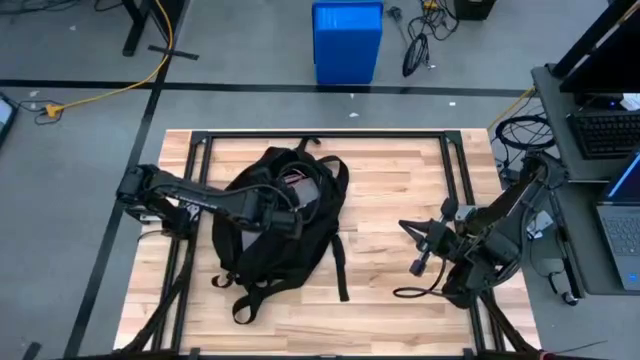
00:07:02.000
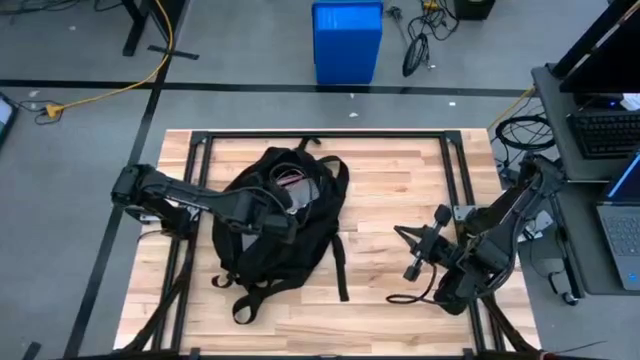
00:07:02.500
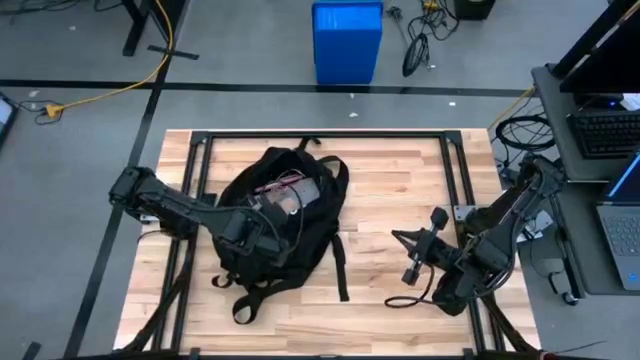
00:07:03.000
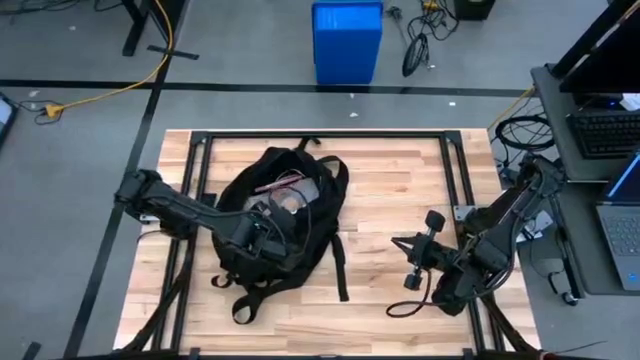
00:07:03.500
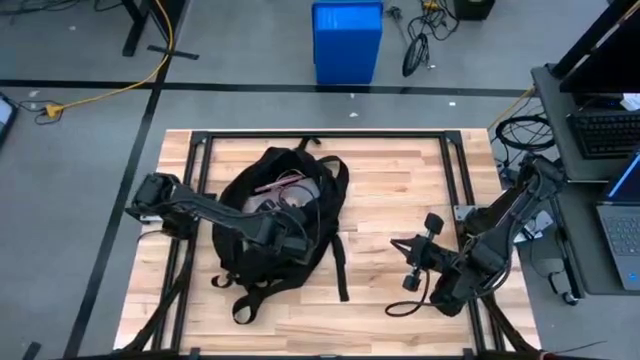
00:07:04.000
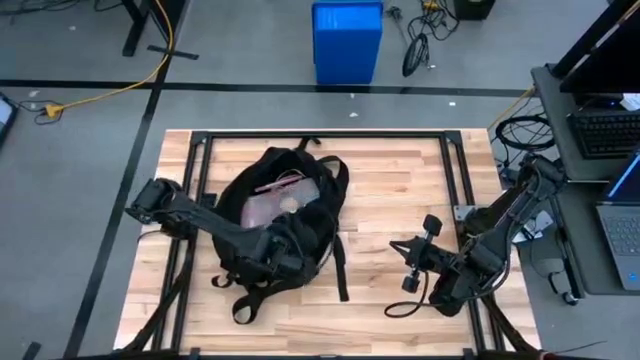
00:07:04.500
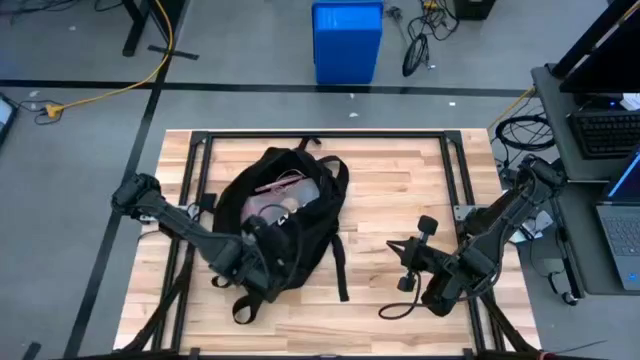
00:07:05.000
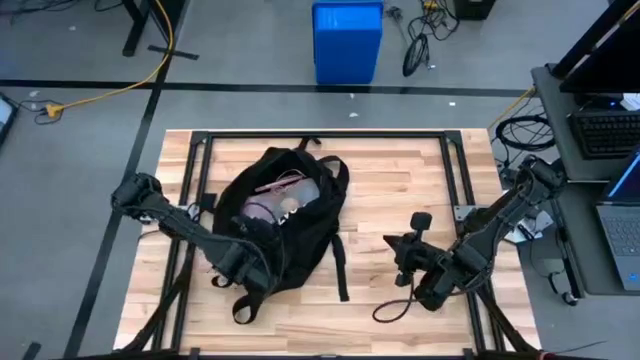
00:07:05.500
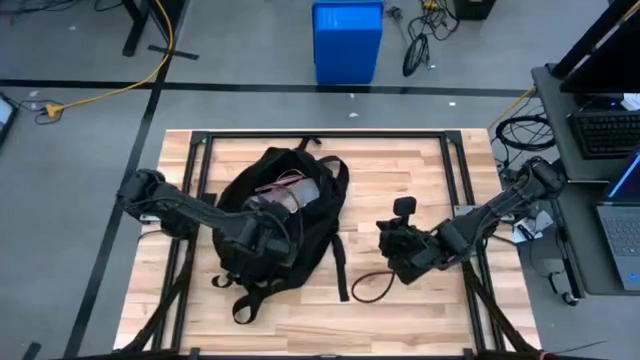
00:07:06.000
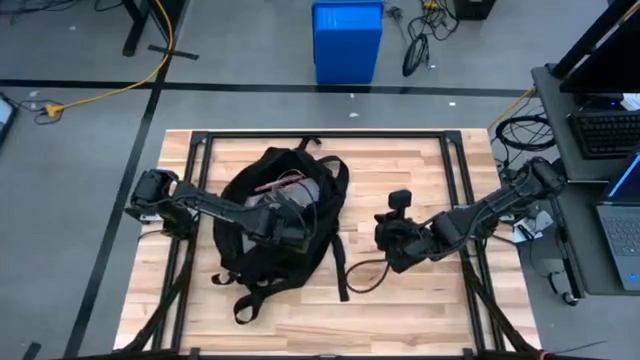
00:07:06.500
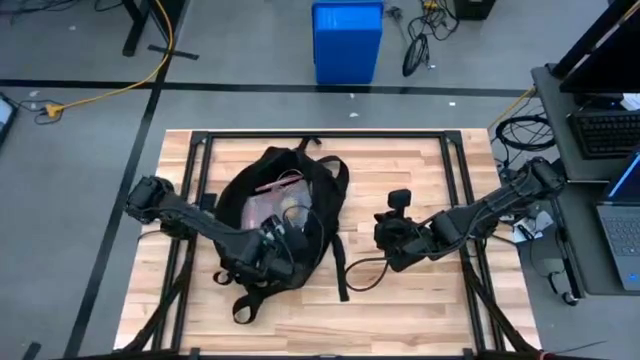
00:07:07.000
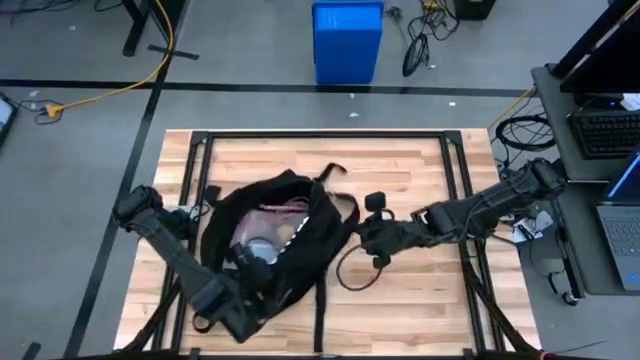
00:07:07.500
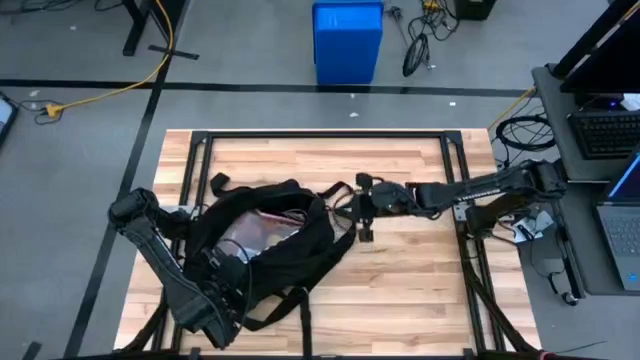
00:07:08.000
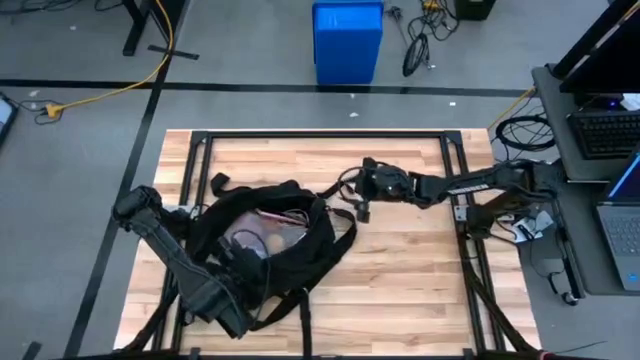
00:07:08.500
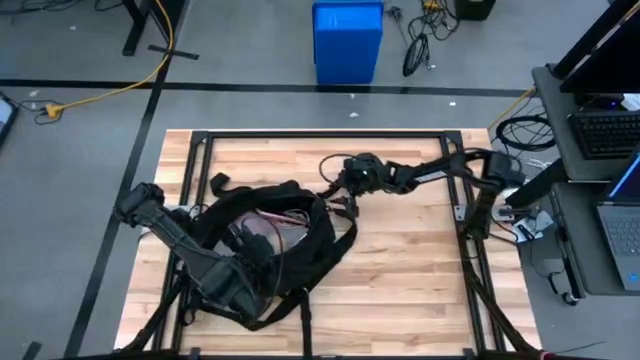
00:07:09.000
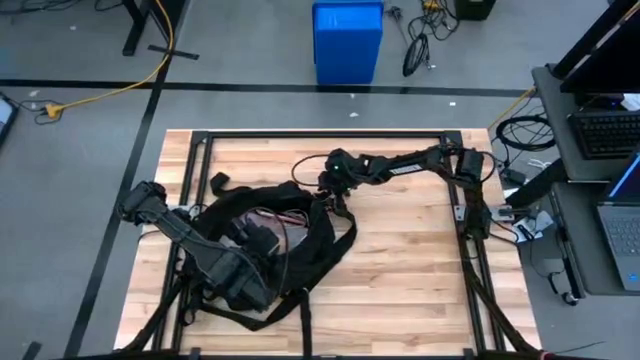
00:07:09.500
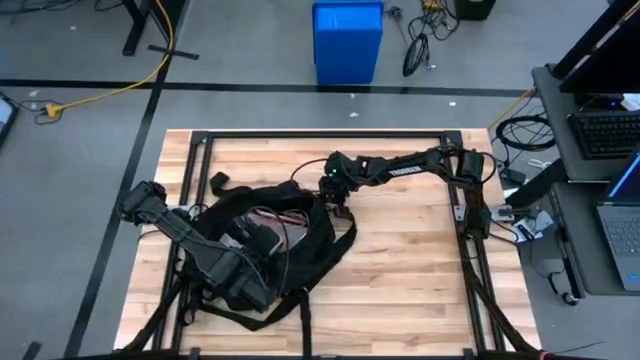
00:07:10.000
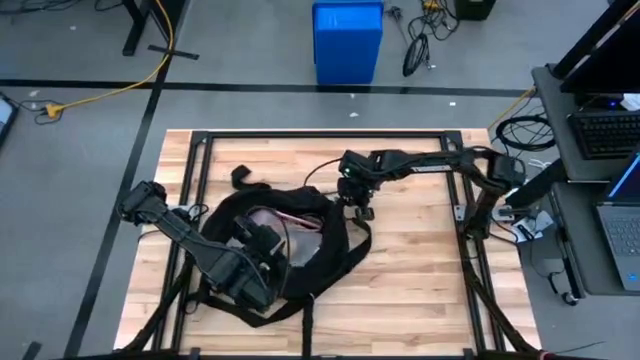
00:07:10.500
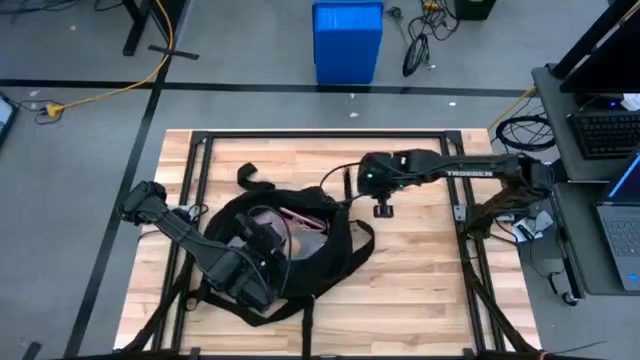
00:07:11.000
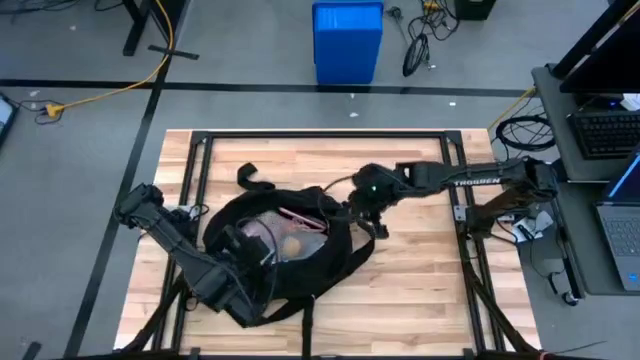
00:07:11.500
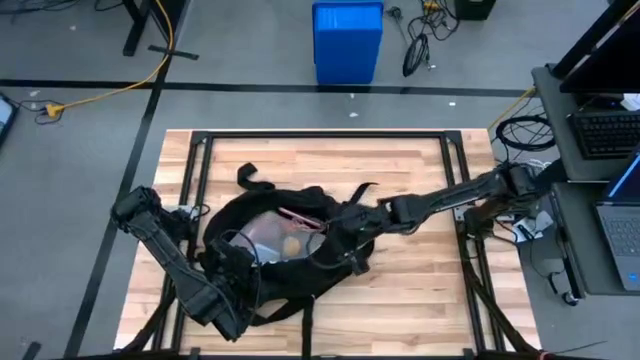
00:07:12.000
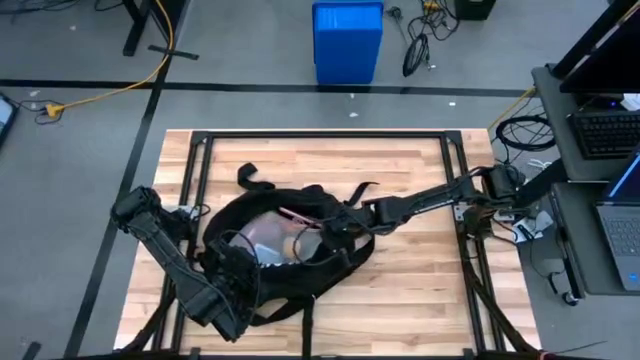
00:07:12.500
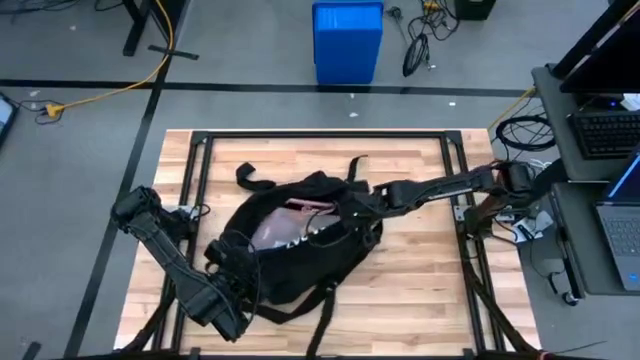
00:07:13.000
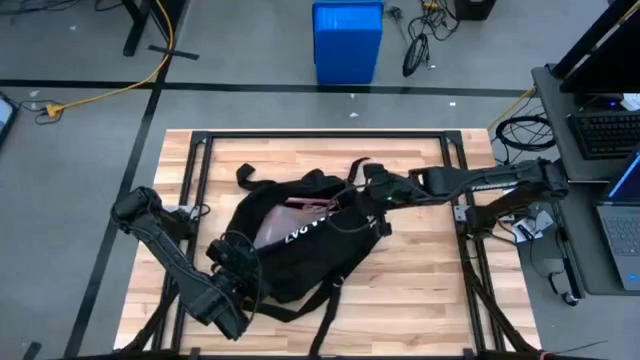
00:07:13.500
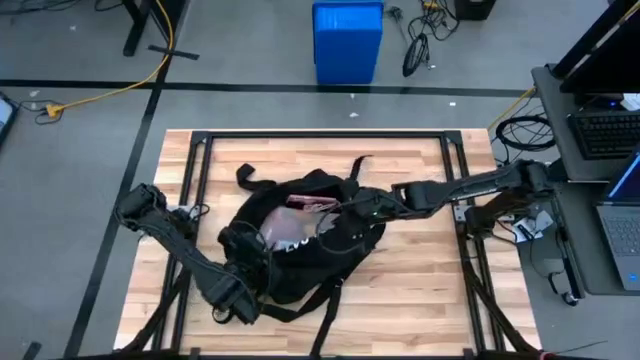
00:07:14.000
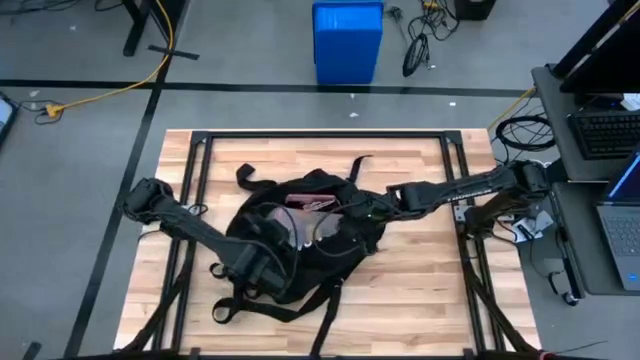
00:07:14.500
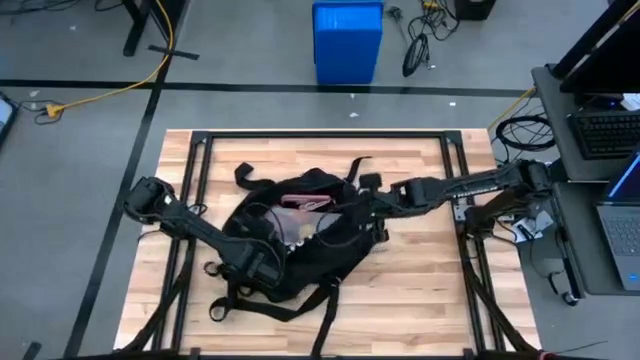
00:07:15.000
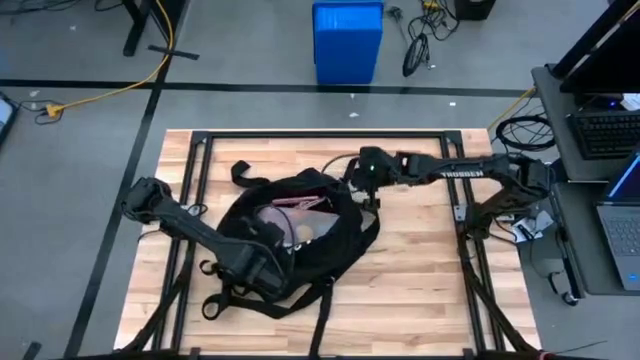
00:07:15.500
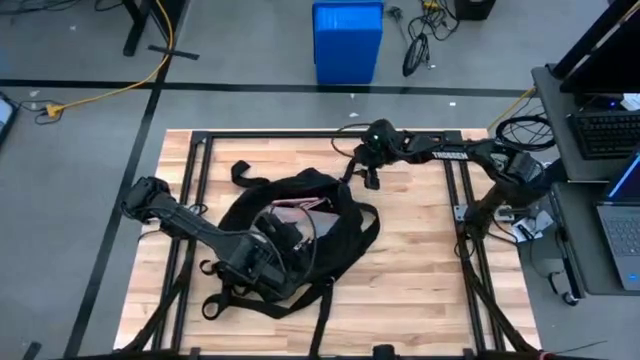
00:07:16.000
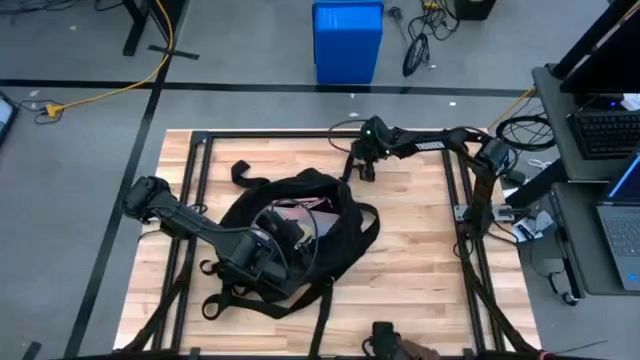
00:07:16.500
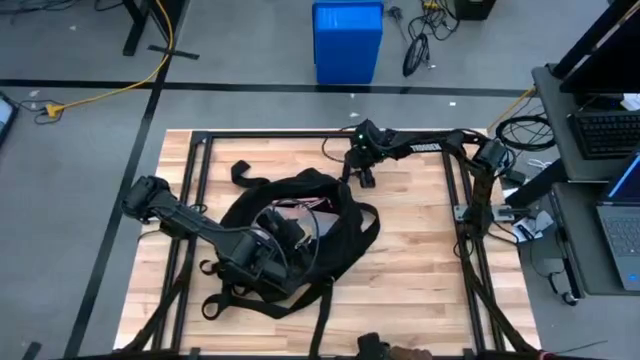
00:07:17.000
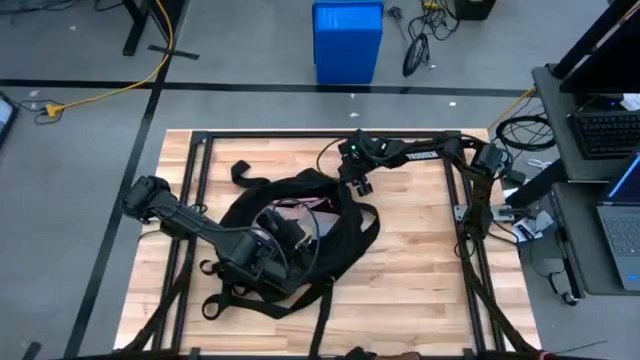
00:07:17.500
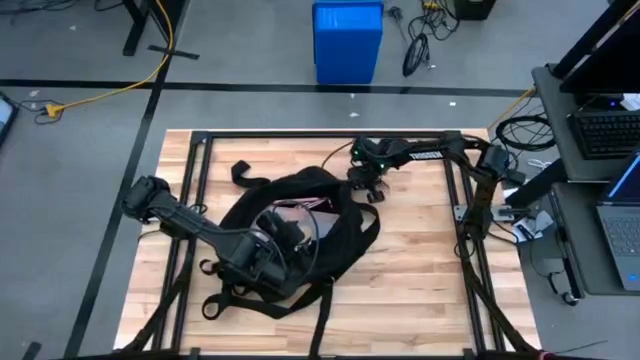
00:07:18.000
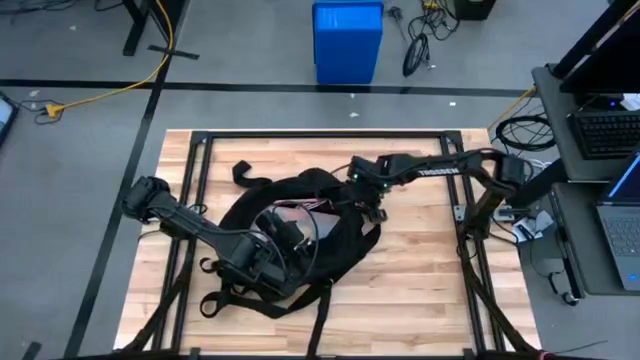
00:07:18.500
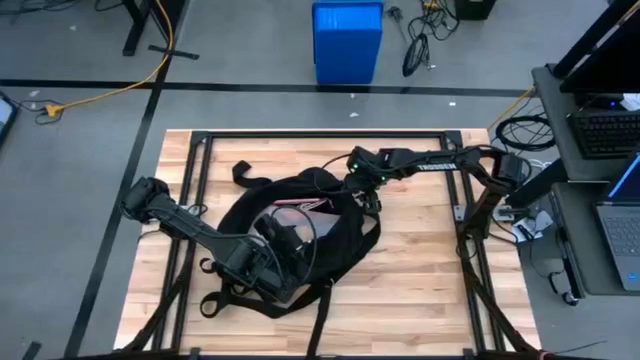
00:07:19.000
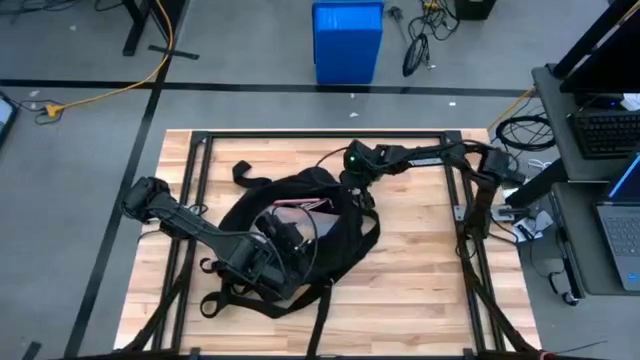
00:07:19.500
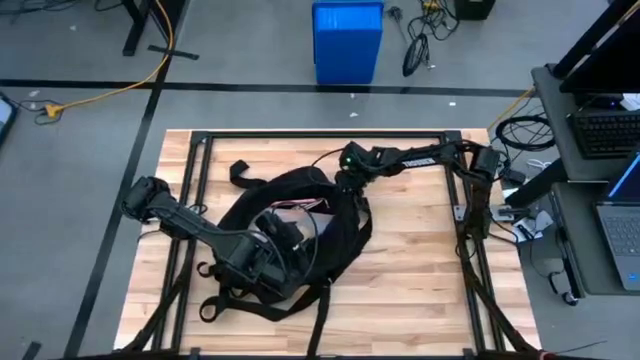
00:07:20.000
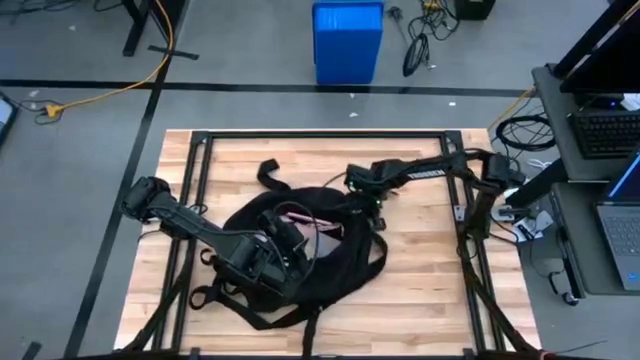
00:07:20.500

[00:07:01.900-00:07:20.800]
Task: Unpack backpack
Close the black backpack

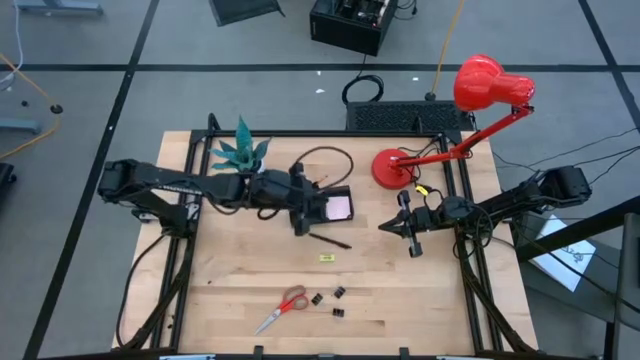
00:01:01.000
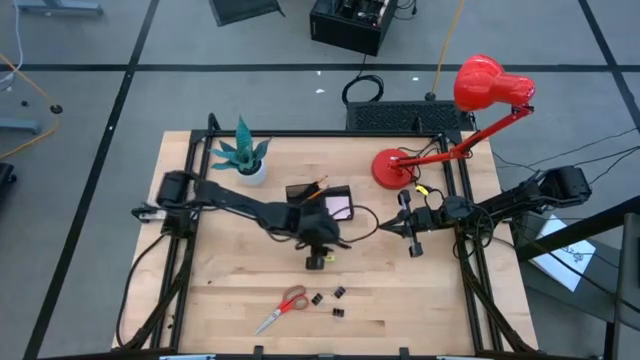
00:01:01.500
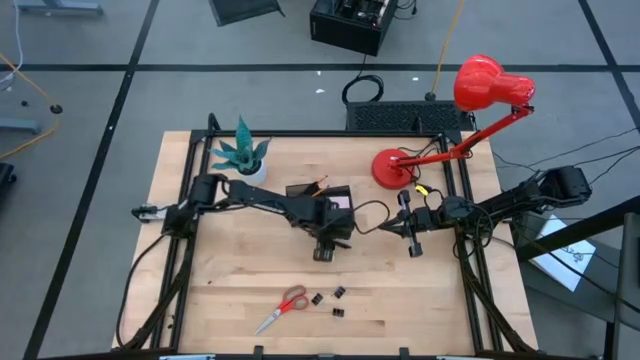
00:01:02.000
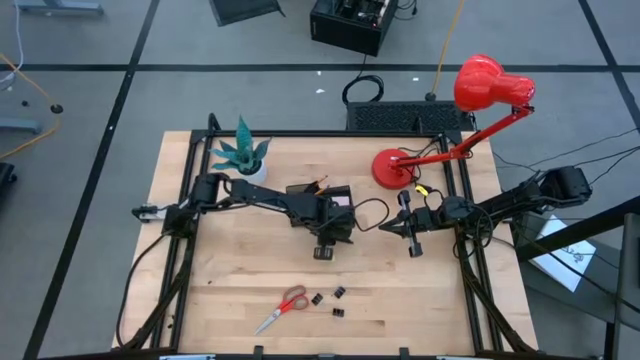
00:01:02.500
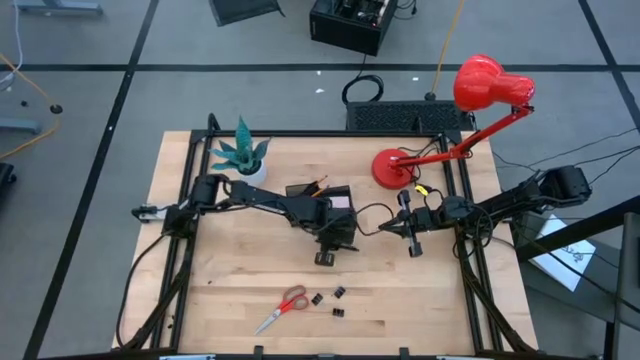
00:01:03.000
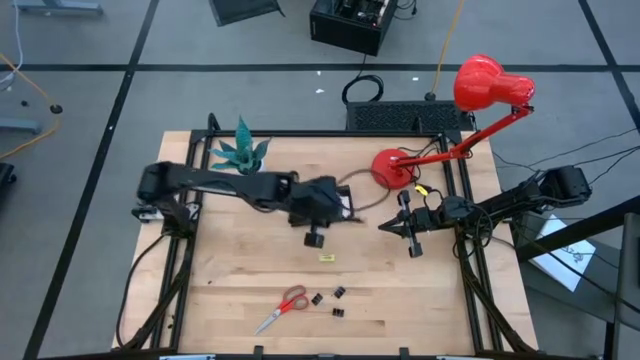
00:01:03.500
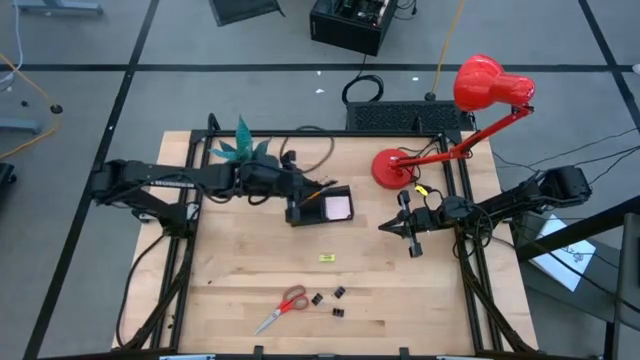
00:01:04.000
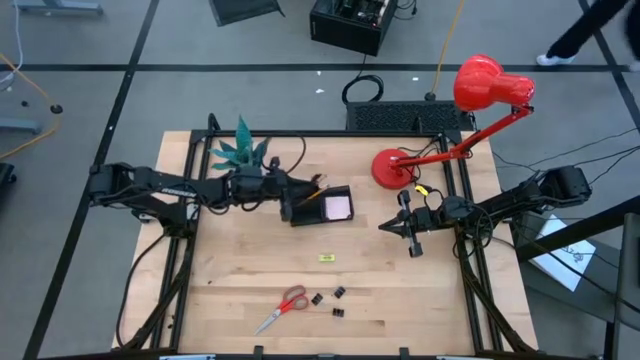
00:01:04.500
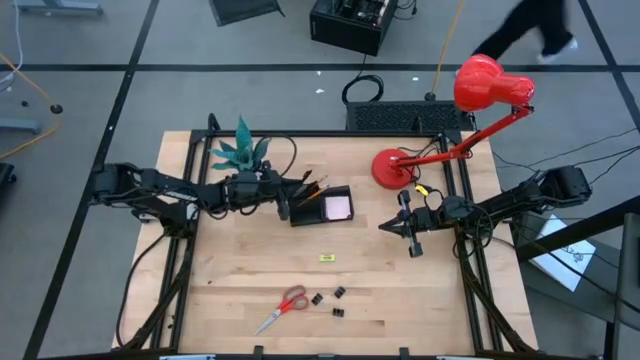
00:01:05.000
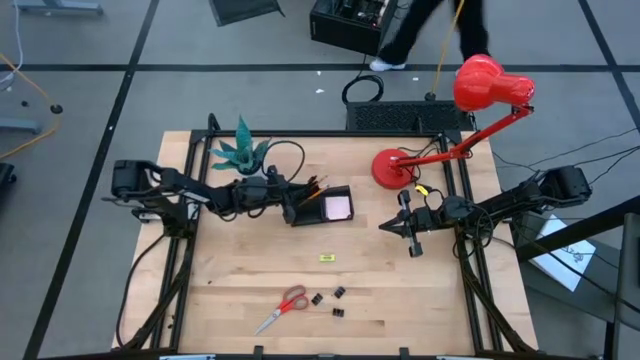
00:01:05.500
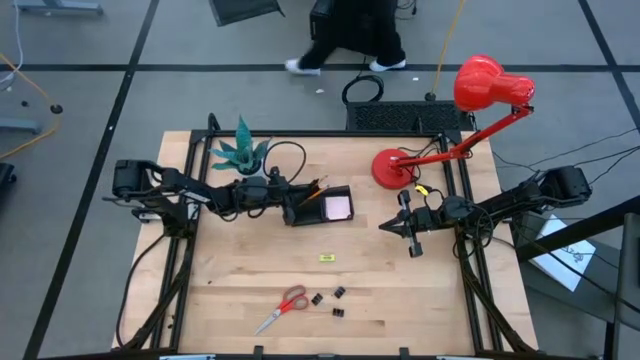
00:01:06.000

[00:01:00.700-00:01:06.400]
Task: Pick and place office supplies into organizer
Put the black pen into the black desk organizer
